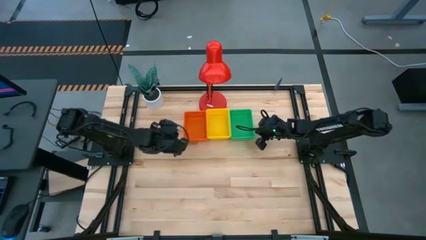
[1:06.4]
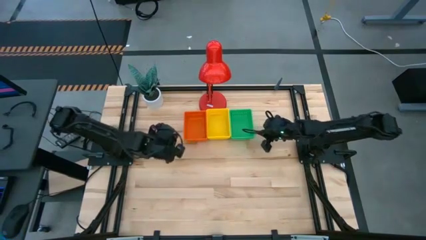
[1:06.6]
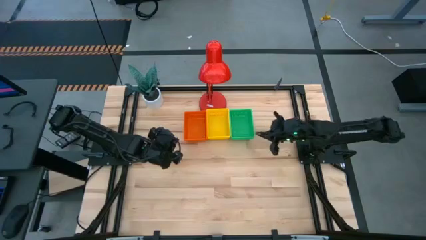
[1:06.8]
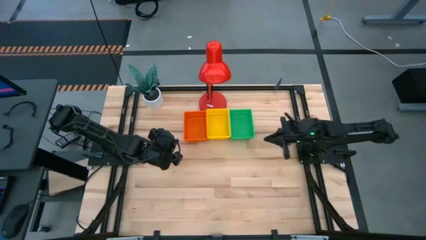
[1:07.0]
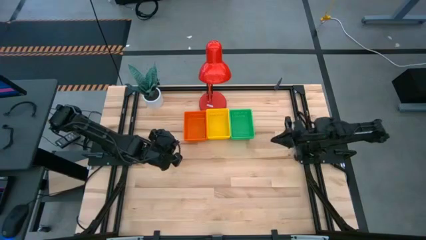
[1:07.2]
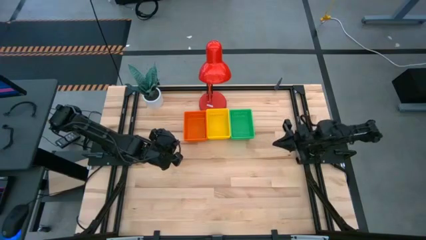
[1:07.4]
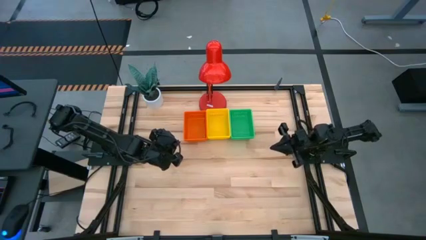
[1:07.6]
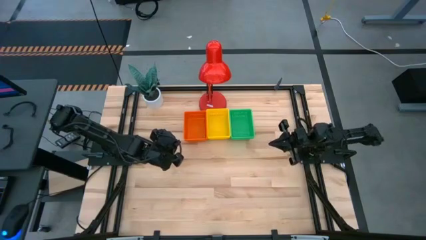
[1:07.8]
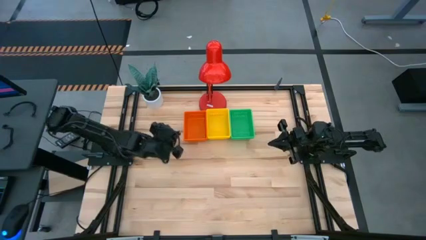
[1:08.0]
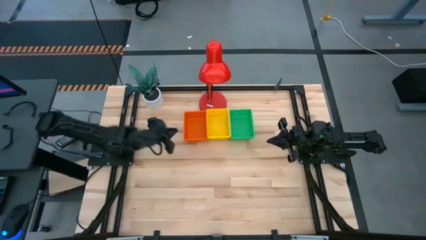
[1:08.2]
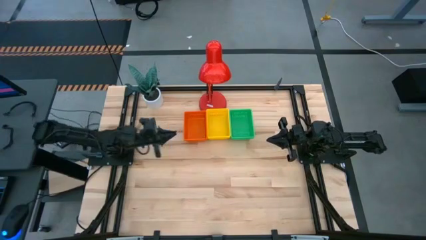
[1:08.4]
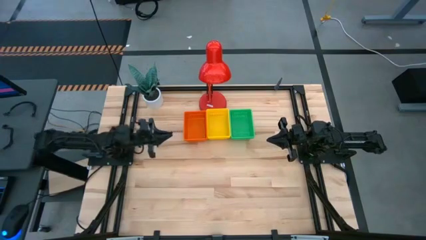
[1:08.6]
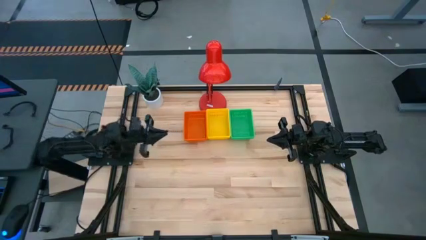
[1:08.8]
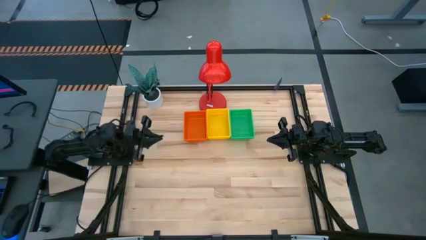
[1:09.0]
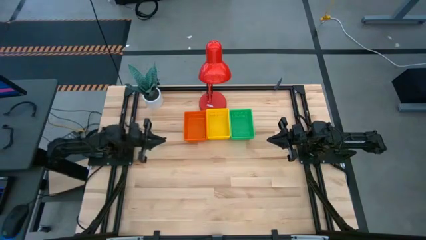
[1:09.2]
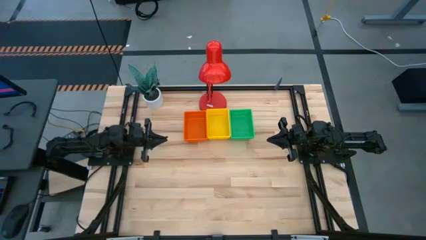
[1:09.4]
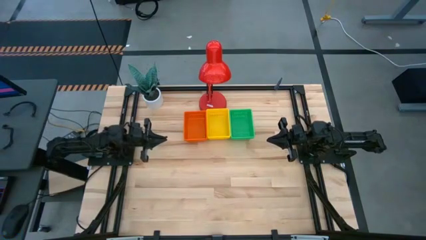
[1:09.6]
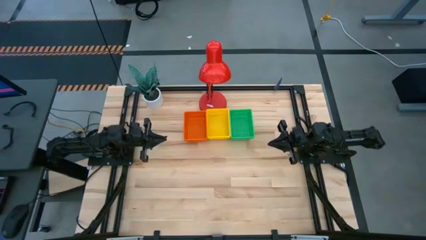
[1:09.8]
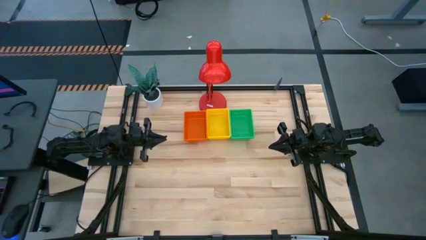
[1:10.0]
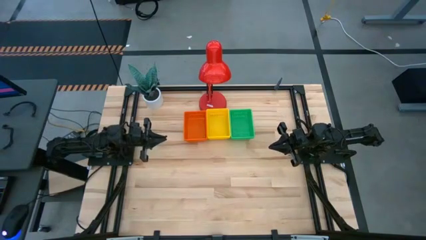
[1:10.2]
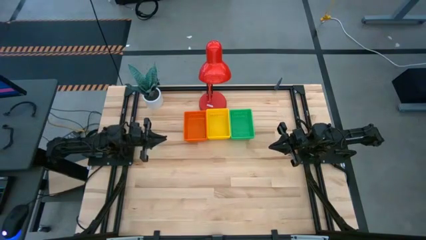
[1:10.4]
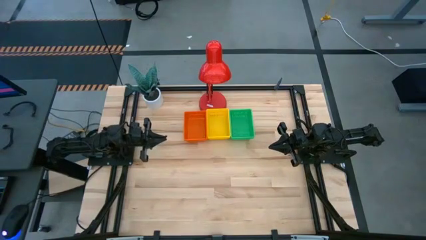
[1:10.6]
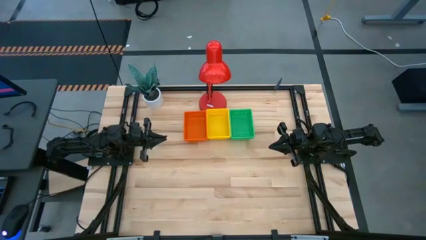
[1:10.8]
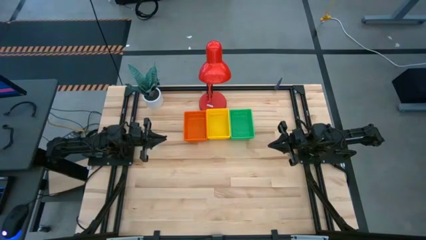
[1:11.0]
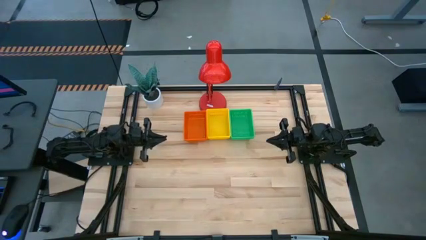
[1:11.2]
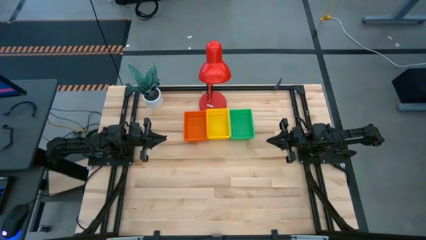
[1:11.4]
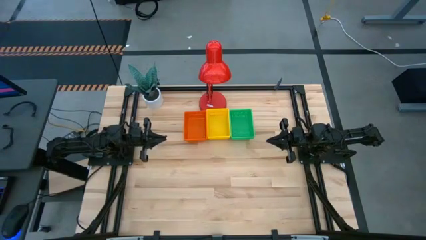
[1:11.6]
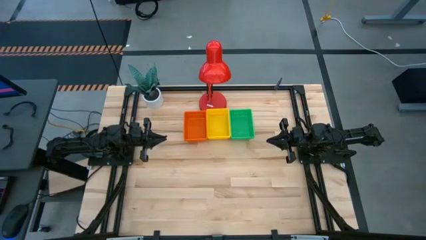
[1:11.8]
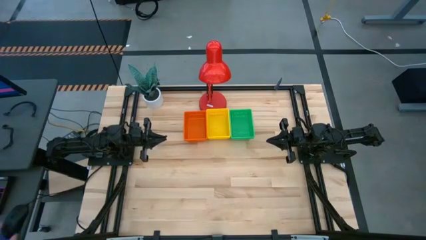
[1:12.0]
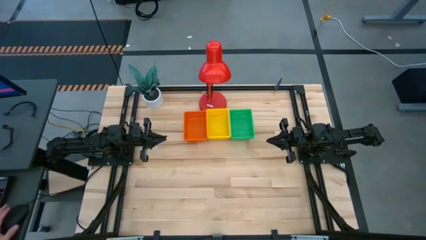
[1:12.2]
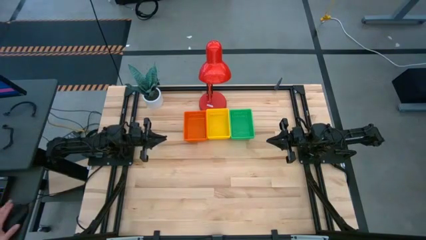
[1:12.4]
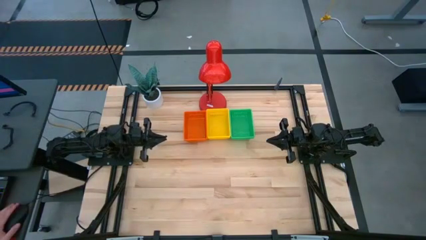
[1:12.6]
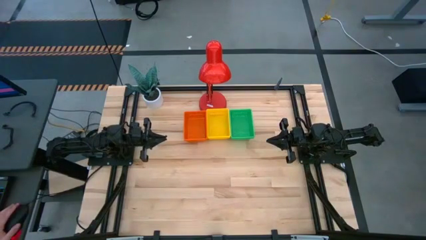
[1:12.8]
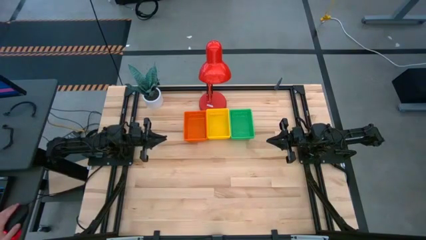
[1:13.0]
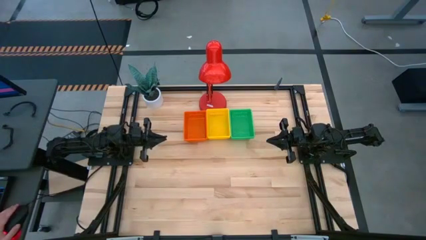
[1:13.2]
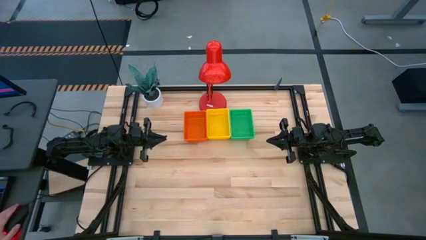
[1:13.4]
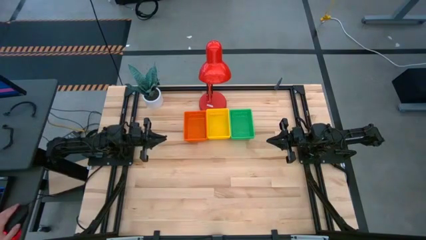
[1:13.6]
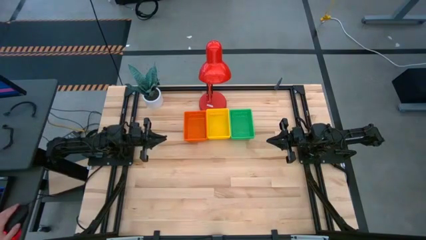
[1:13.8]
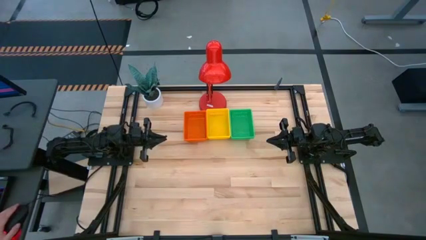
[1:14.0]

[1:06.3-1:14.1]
Return to Home Position

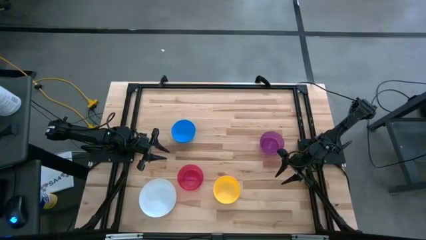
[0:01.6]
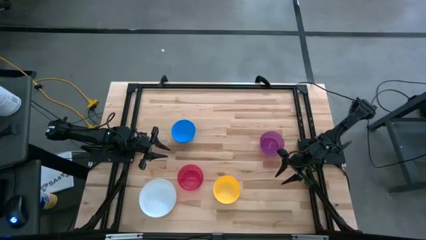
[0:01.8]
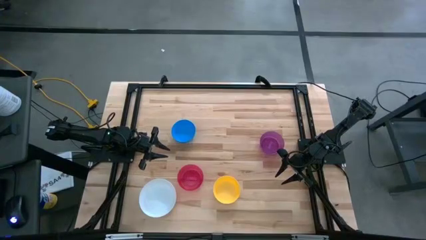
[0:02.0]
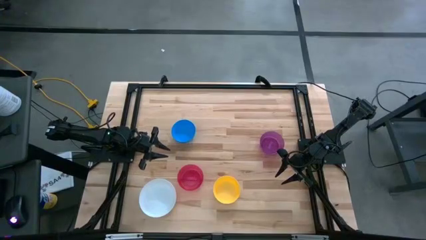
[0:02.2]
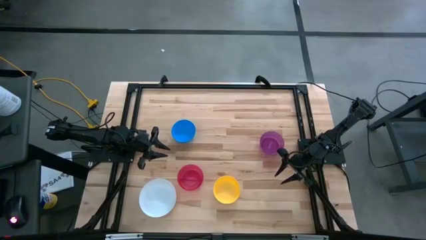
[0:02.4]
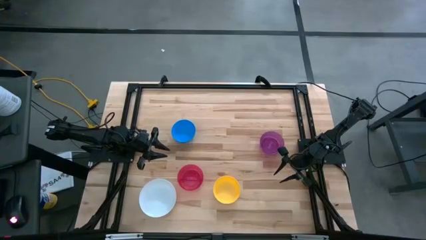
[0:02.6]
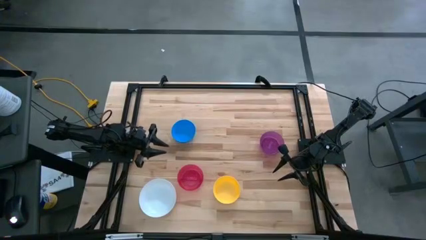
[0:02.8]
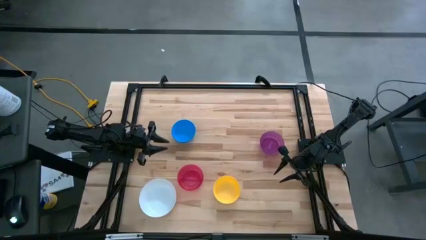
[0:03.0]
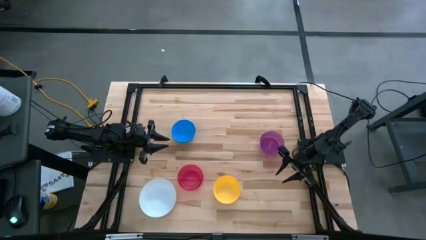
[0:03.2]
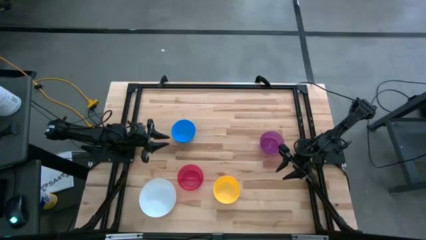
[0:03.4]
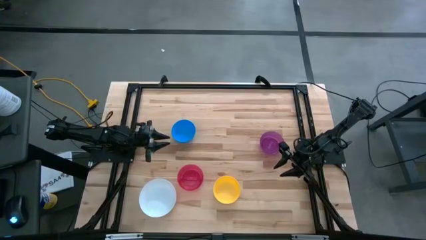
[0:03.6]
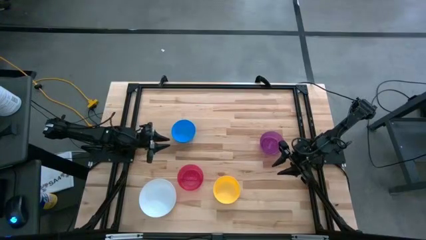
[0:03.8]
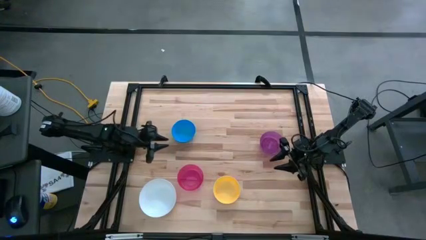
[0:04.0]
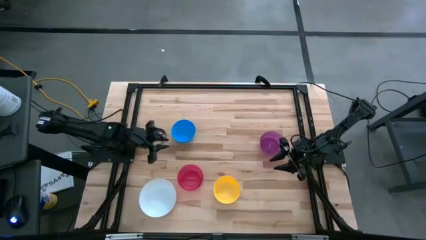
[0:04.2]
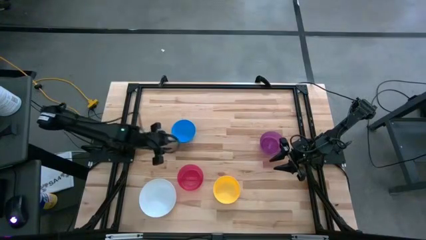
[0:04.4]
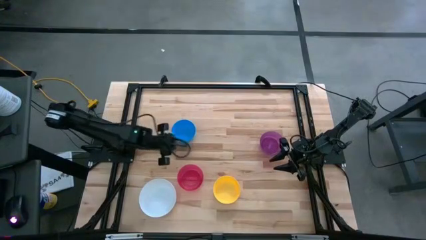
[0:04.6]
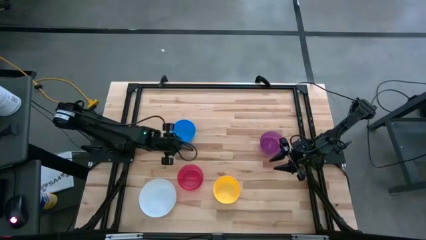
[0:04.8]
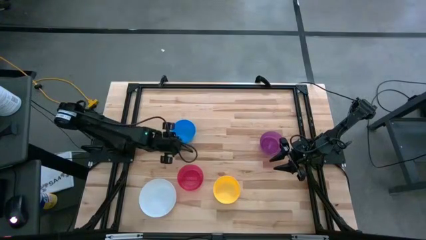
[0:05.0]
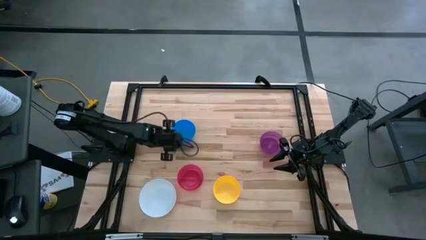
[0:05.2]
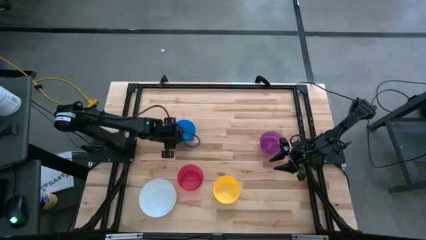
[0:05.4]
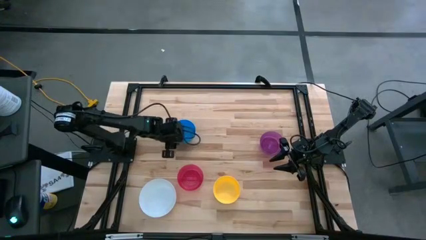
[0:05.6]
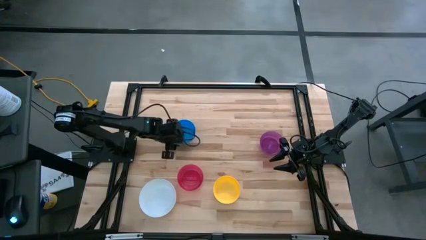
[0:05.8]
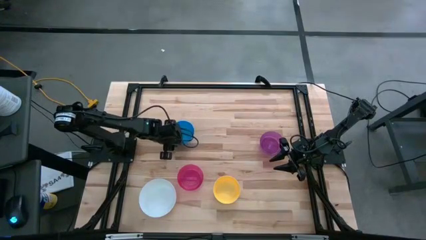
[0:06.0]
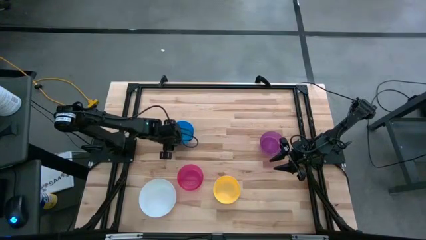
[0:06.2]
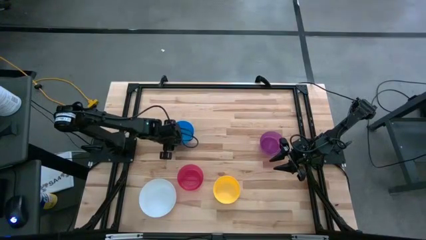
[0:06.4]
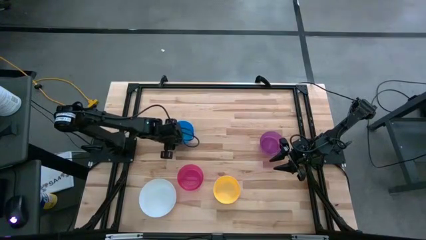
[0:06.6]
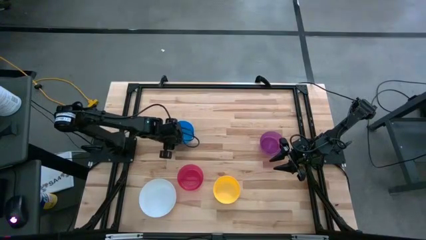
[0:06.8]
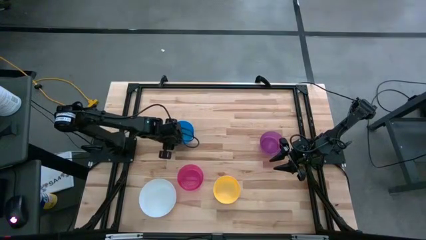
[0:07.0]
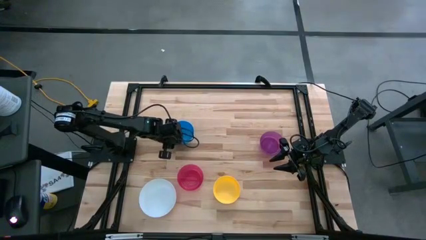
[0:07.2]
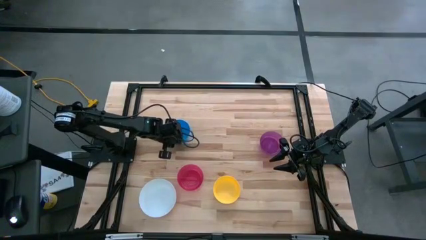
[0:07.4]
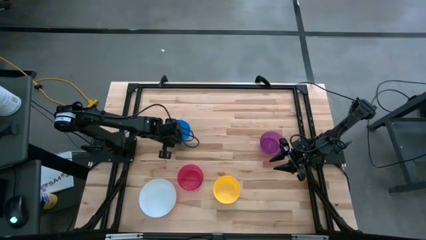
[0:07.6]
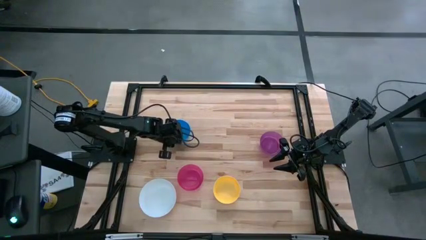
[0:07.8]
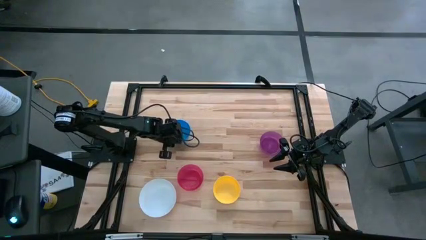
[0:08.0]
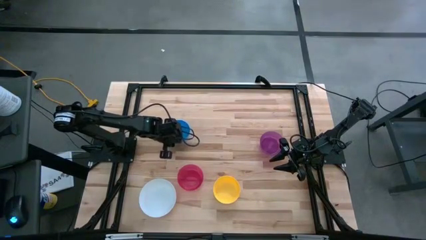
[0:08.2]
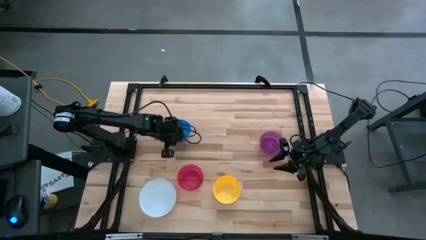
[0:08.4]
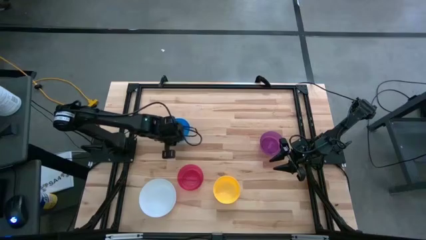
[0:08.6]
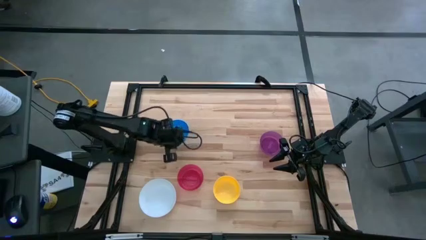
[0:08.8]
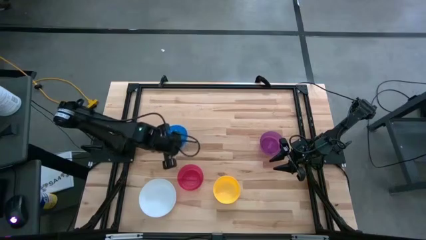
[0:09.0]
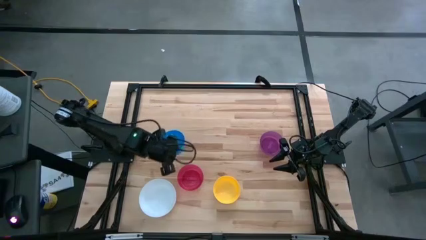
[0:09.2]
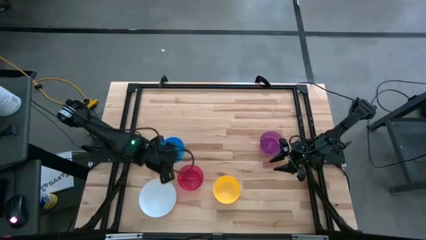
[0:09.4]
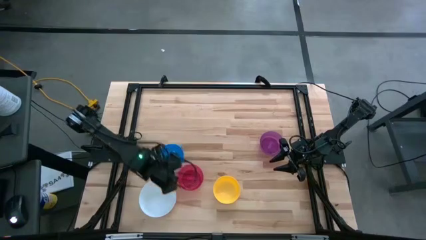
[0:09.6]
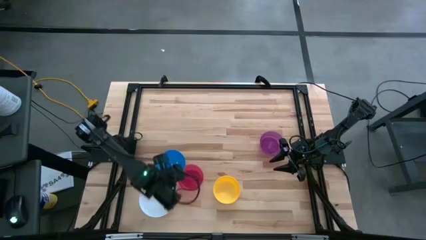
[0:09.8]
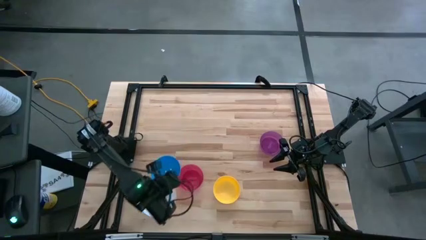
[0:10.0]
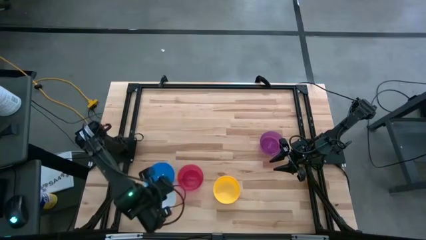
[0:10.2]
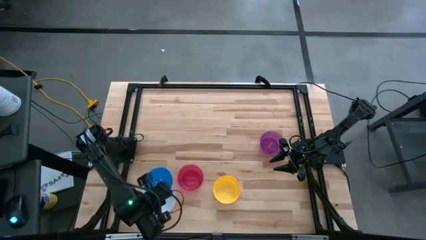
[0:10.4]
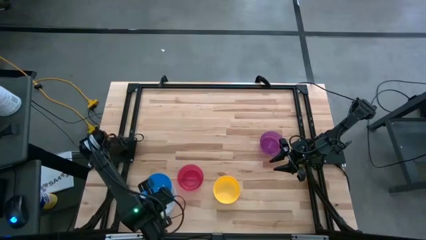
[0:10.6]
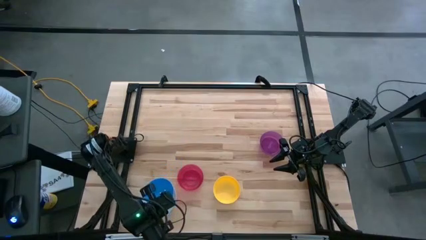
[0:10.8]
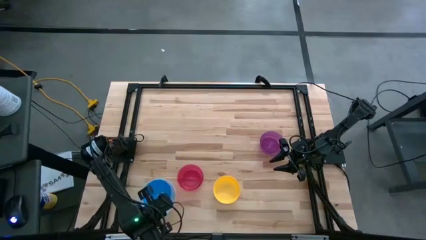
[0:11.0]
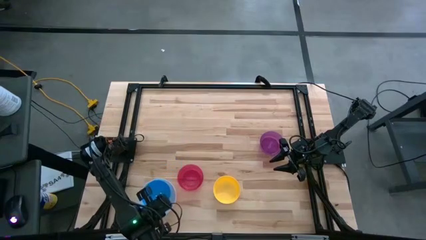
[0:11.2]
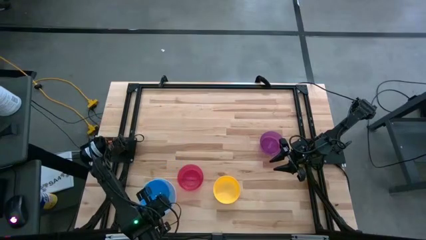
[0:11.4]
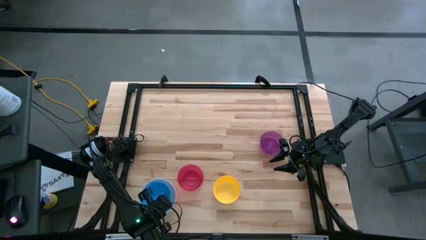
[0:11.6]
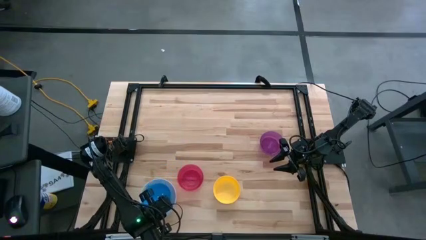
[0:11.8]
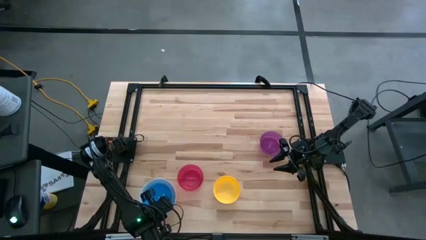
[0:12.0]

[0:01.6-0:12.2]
Stack the blue bowl on the white bowl
